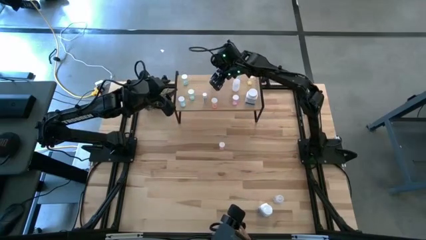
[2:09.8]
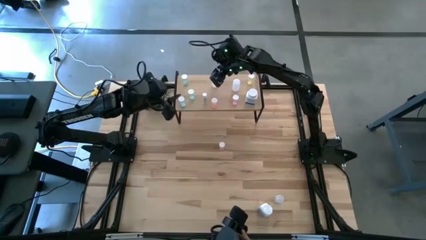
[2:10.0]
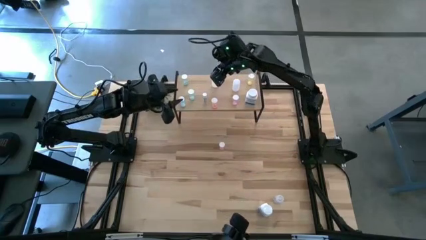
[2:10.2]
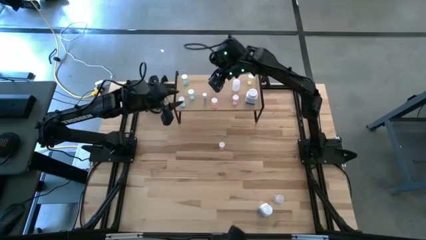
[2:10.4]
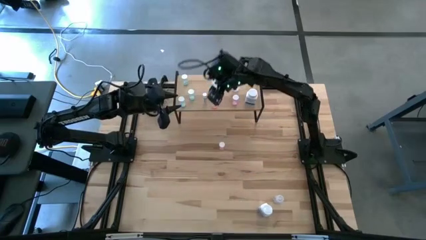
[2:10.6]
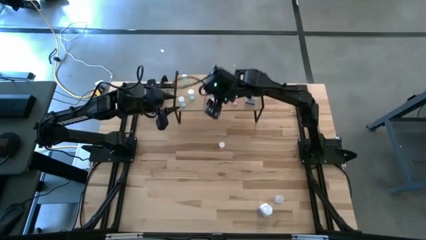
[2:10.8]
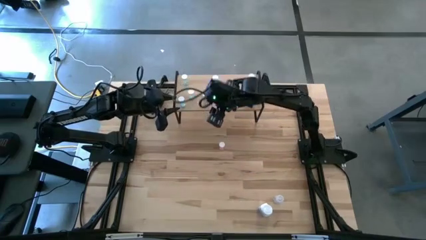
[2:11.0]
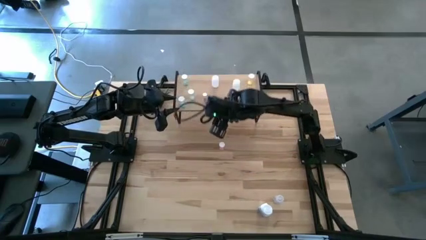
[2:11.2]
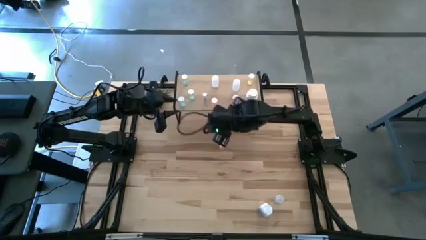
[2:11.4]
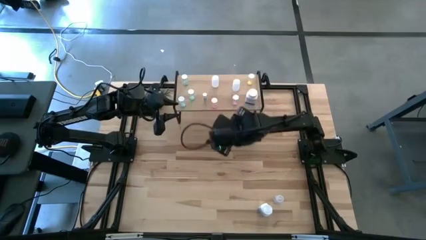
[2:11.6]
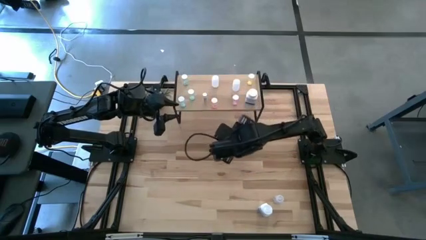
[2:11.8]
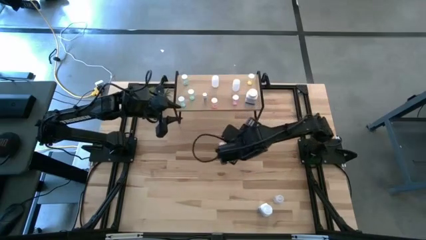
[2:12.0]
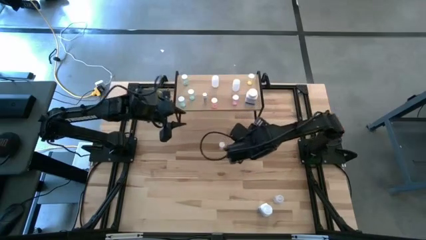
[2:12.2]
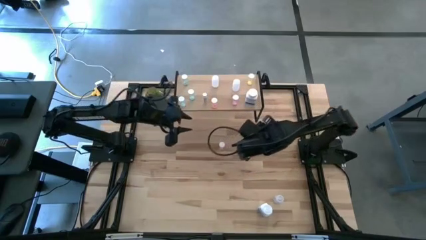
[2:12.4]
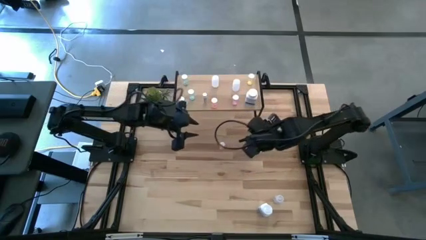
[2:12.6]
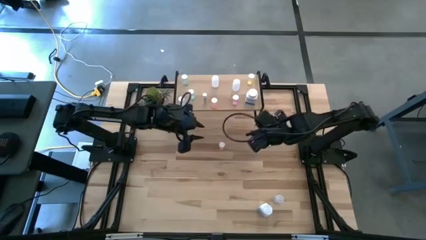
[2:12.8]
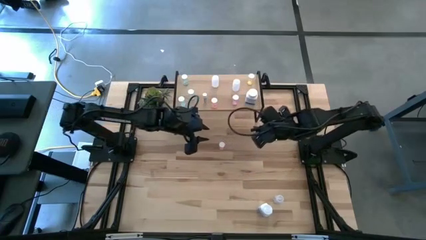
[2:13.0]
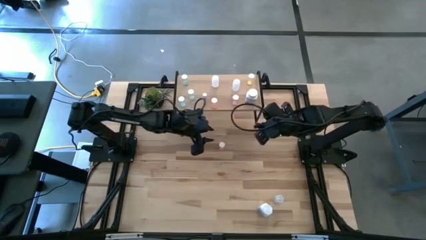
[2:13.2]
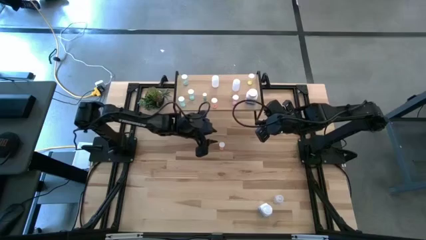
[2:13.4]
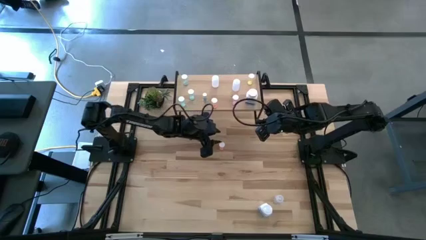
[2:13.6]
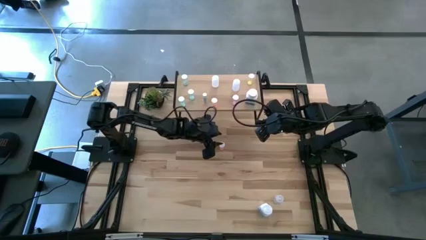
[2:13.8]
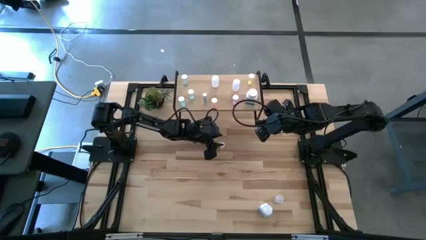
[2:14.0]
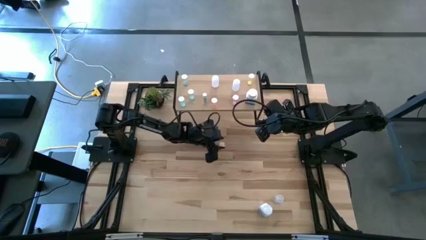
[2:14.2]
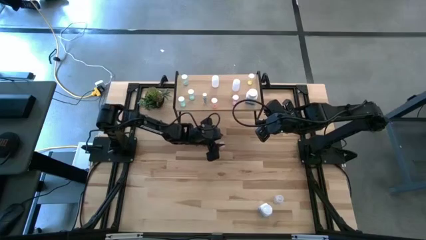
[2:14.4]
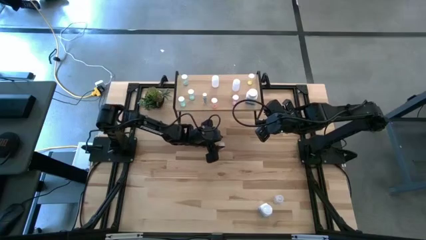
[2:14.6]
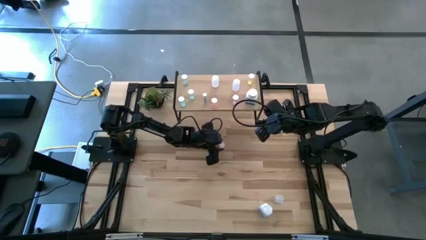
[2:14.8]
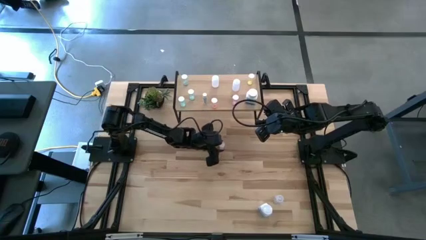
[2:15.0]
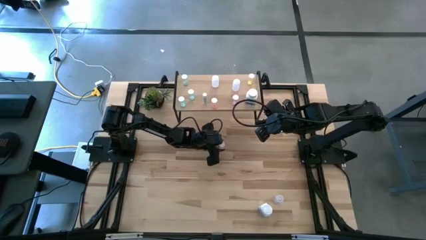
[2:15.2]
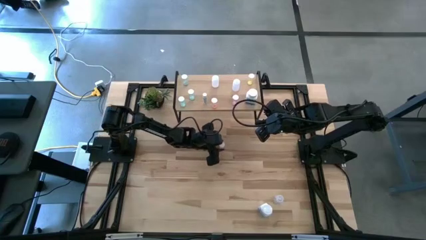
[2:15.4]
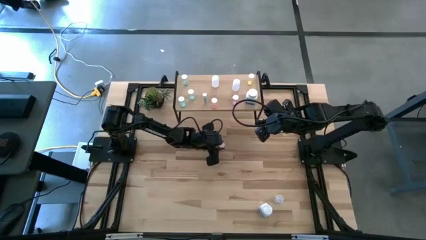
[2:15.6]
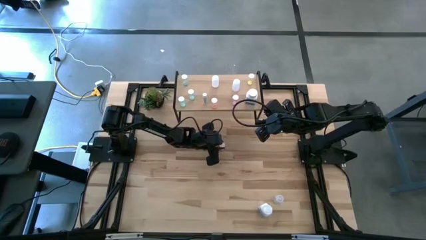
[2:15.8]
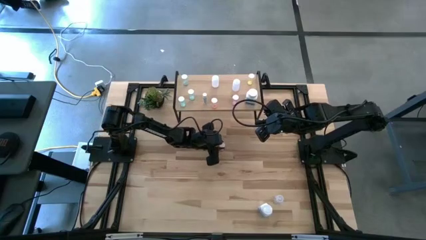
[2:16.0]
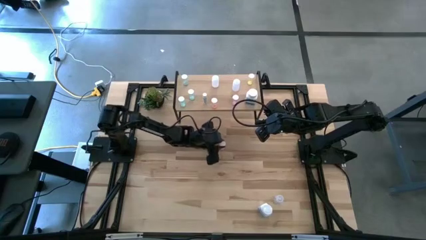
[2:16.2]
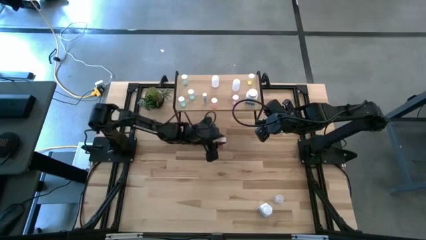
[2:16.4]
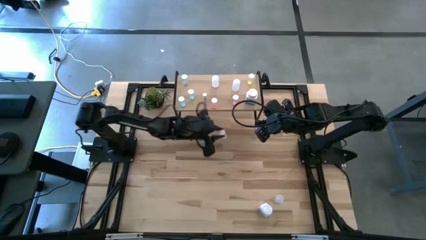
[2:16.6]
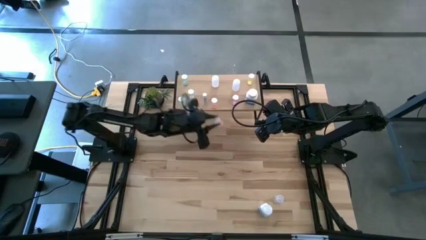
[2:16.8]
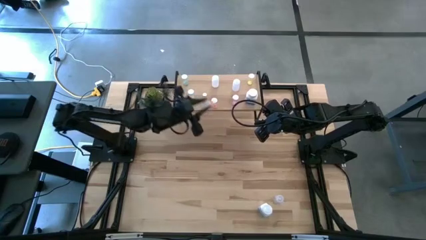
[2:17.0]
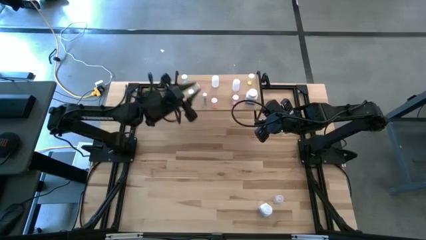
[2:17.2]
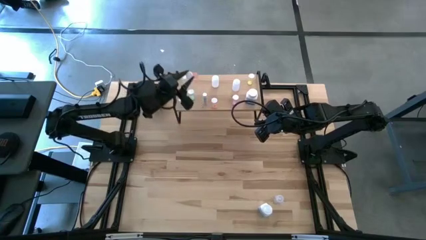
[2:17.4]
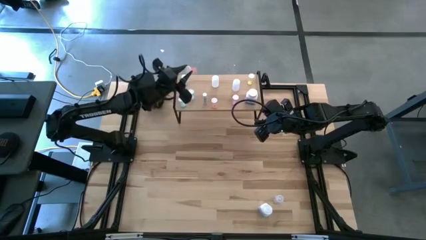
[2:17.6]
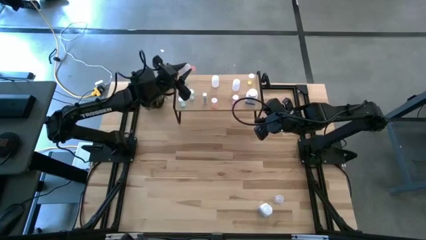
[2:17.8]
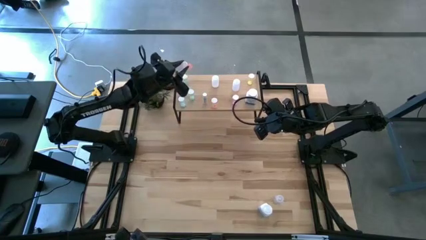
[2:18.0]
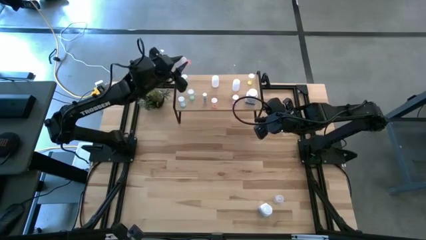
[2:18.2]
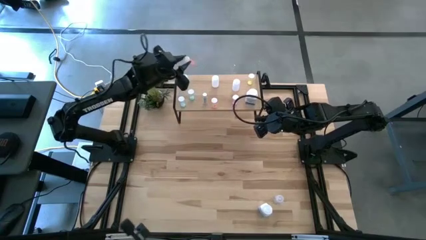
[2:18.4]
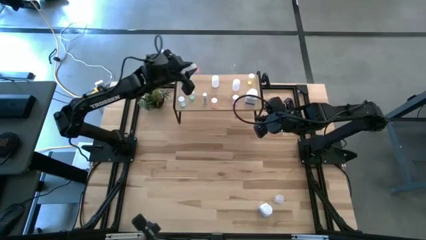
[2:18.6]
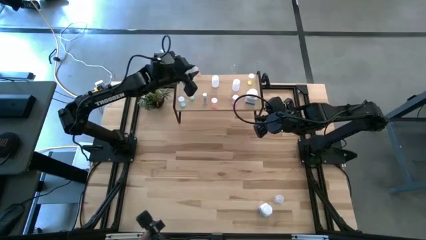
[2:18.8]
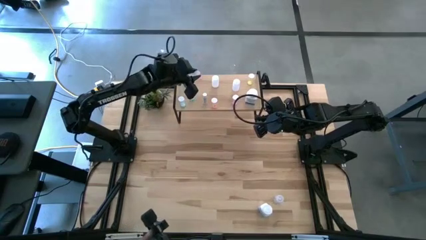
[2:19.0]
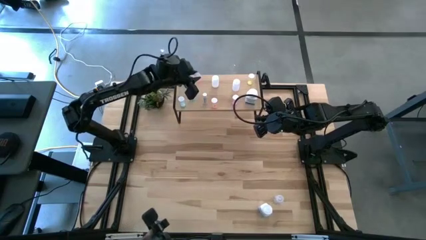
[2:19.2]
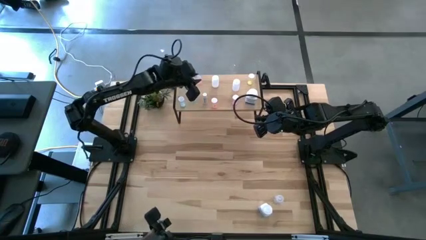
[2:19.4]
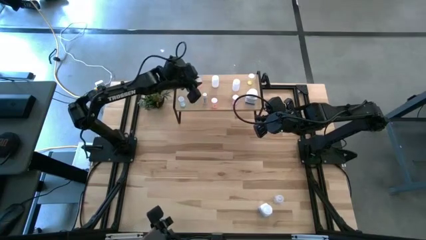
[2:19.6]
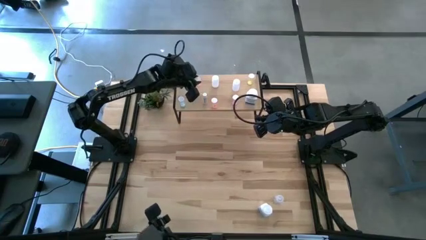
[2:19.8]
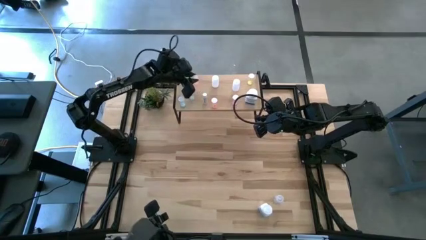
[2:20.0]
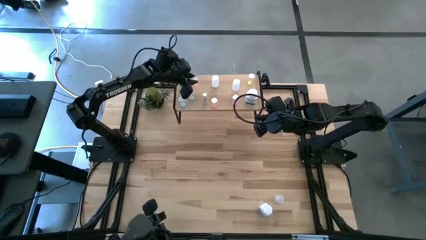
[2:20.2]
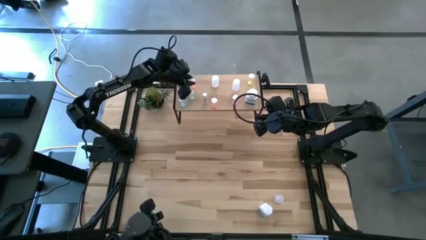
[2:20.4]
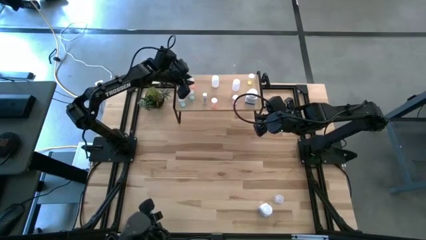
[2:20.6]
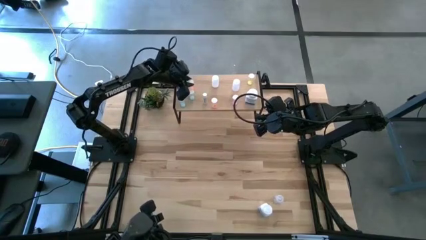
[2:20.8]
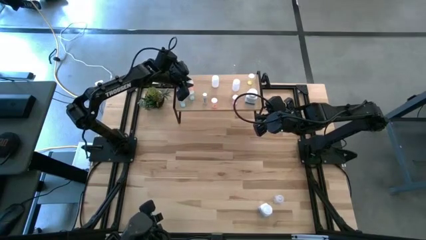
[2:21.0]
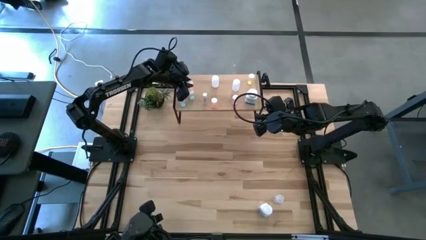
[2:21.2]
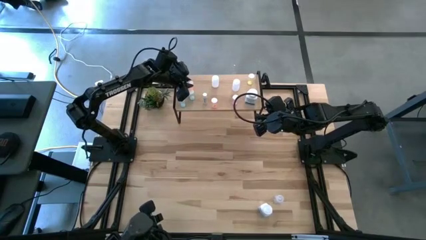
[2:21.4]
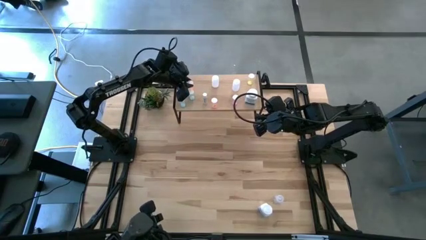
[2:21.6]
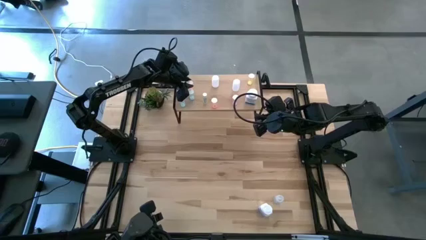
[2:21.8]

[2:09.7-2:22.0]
Task: Pick and place medicine bottles onto shelf by color
Put the orange pill bottle on the shelf

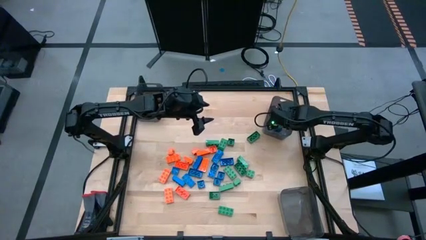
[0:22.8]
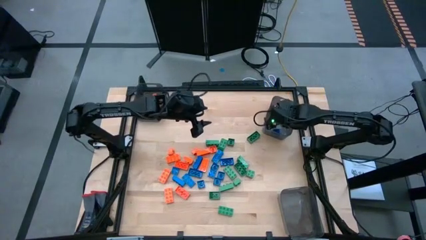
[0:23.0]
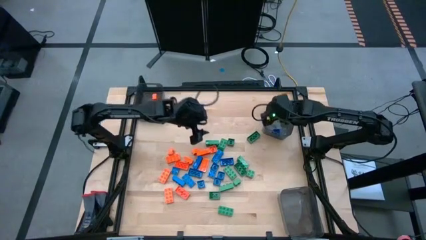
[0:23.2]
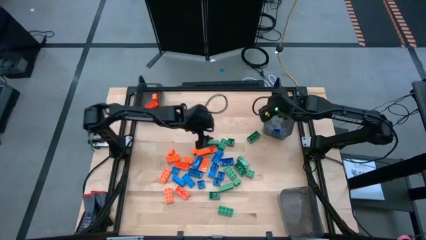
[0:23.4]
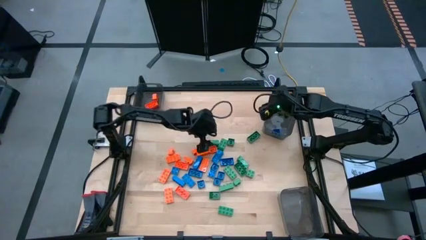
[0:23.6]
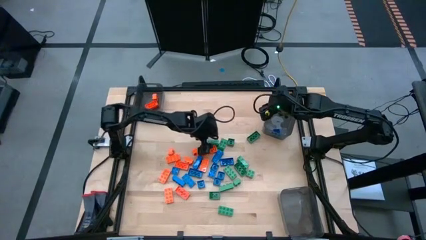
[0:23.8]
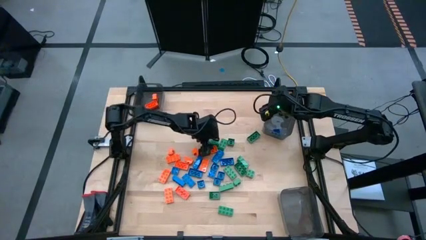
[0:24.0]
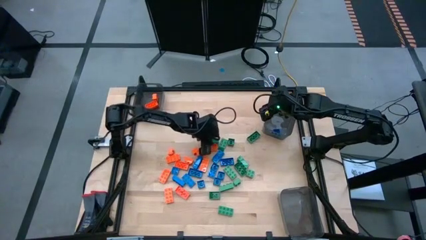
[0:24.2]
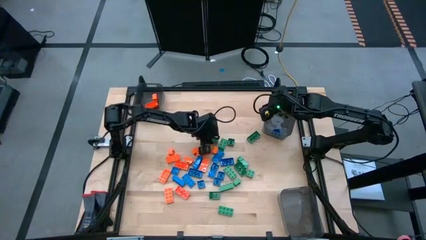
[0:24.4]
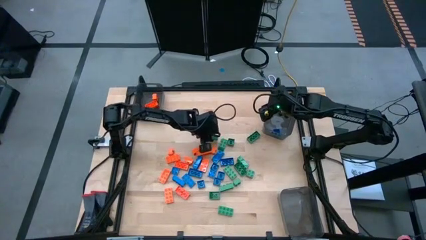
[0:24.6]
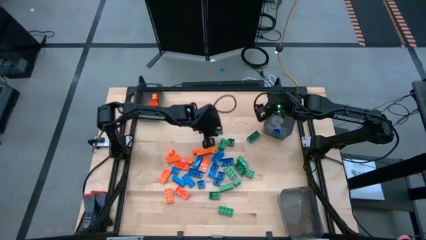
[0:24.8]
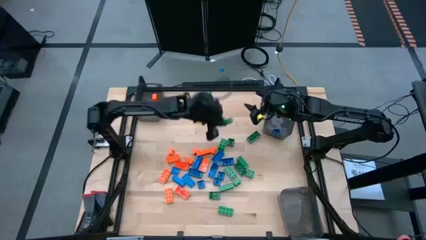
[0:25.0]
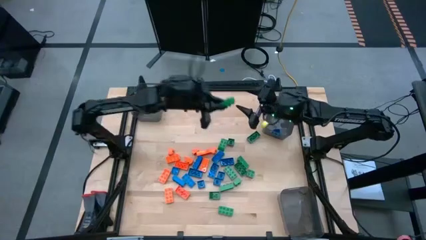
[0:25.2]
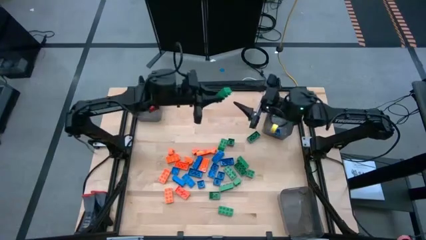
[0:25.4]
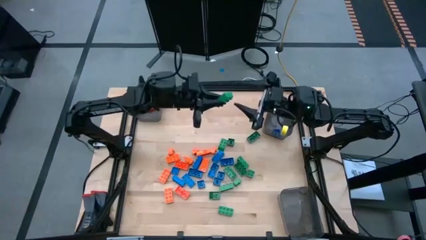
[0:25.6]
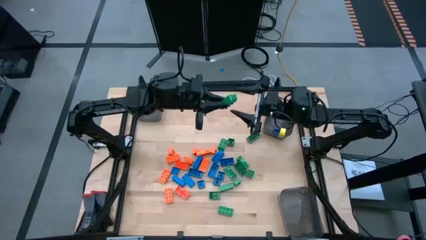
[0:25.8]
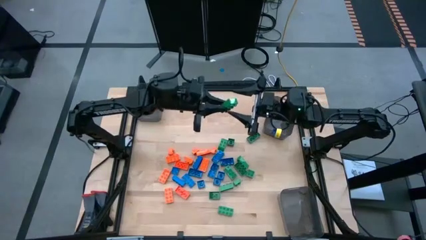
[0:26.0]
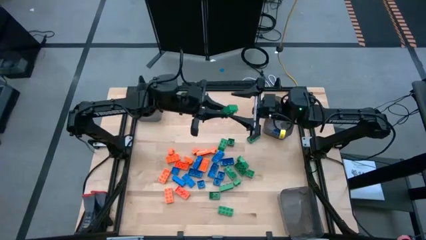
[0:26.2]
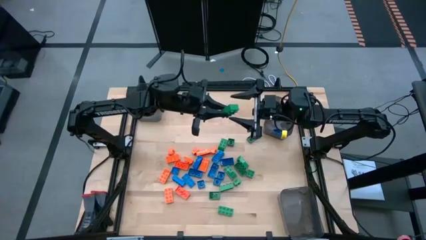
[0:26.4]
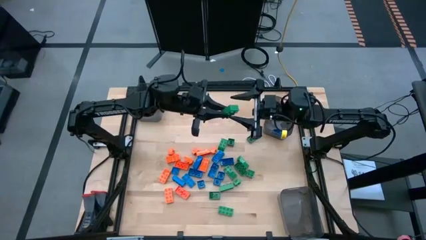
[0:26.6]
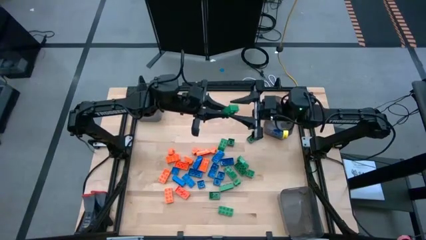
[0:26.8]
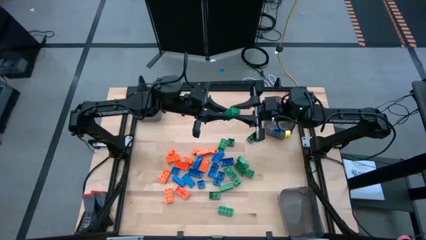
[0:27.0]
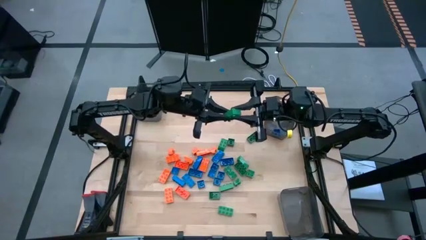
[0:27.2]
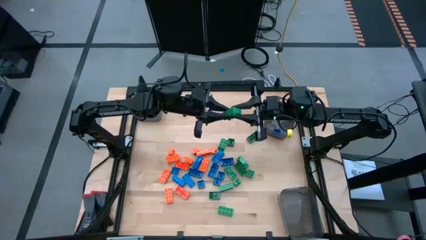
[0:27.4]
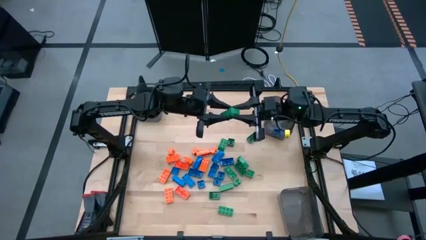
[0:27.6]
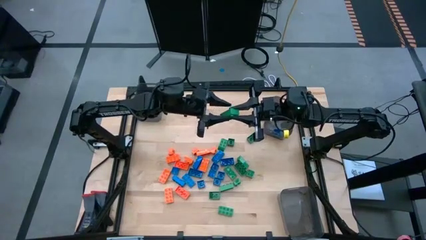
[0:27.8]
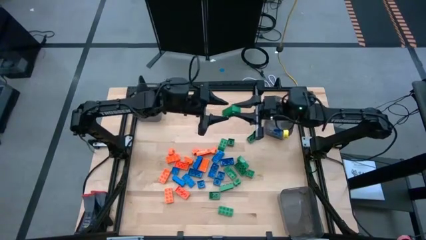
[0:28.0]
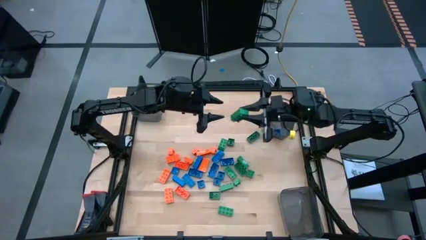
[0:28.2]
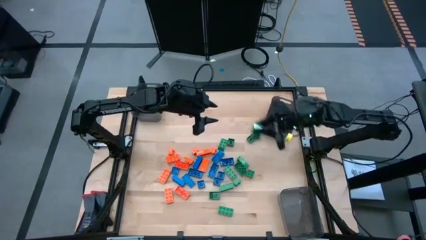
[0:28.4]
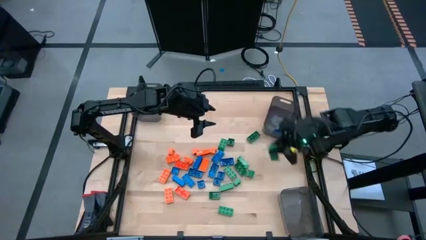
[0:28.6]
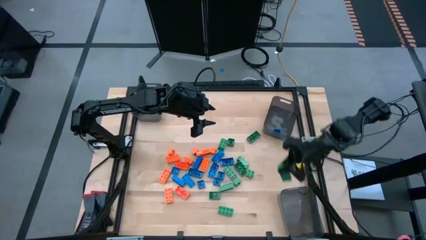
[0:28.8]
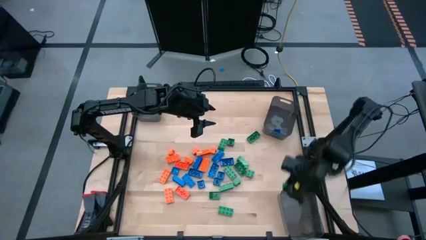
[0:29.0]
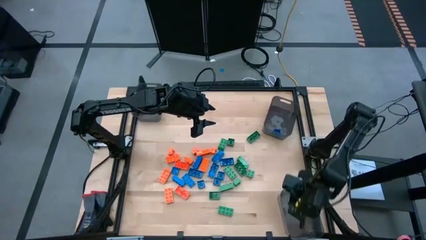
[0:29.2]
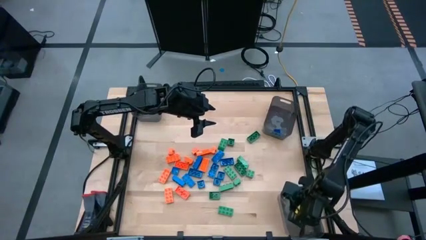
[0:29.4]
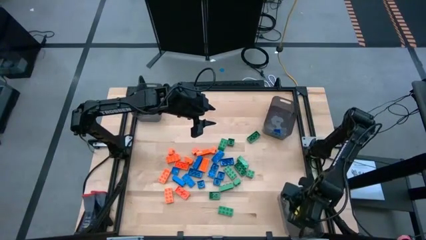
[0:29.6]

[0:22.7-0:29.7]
Task: Sort blocks
Put the green game piece into the bottom right black bin
